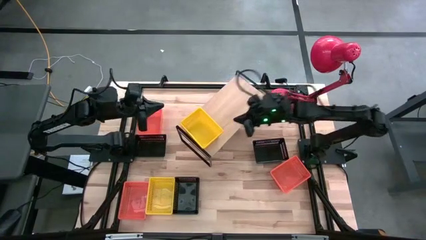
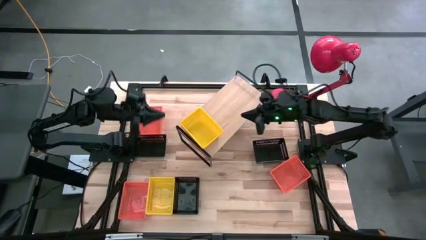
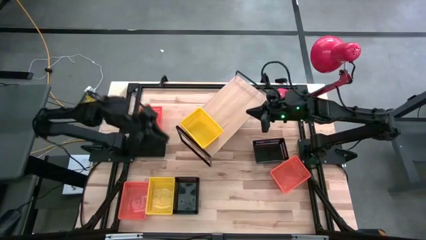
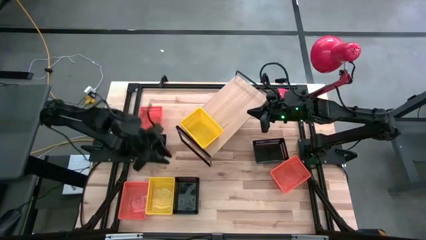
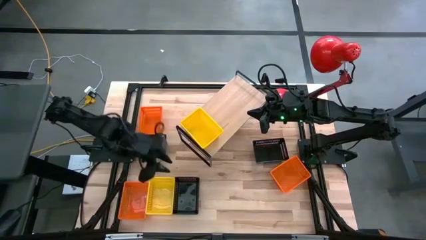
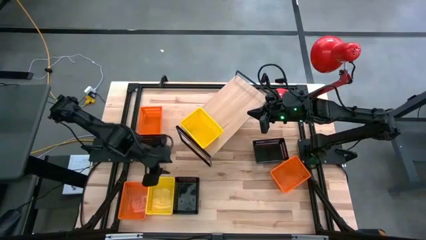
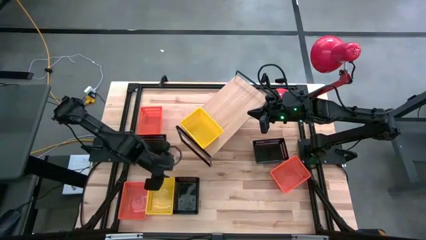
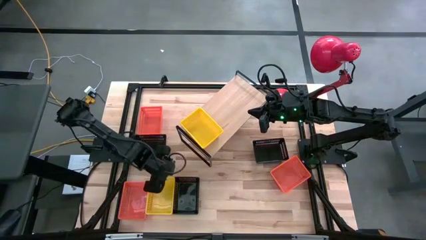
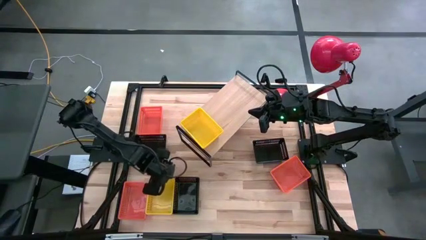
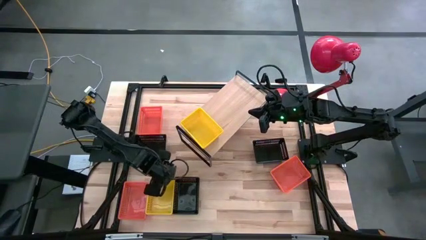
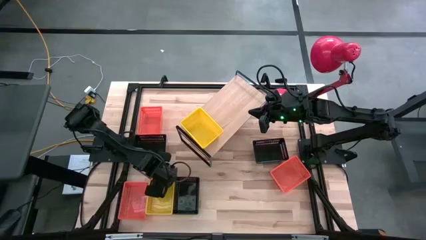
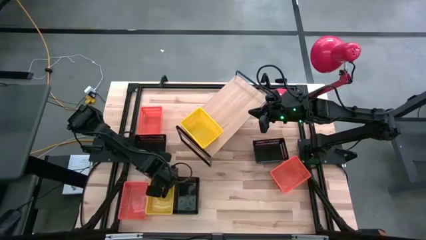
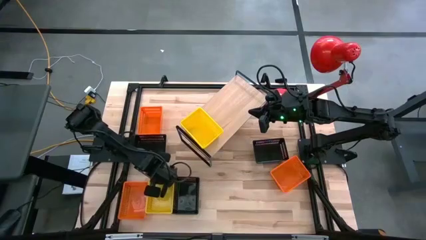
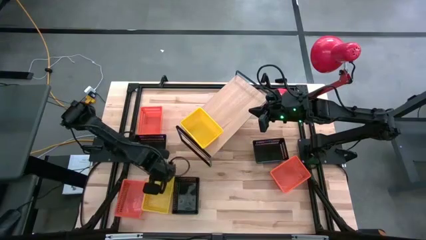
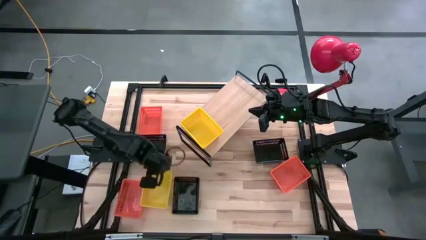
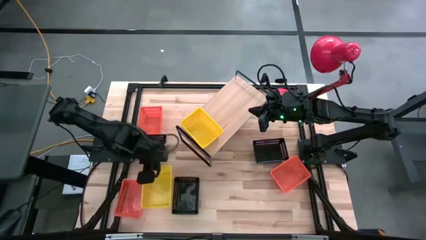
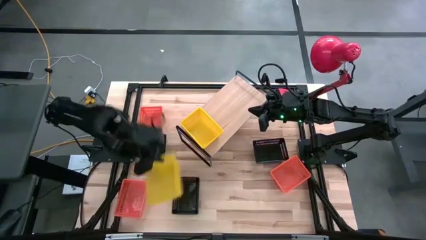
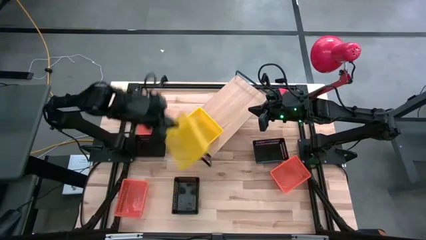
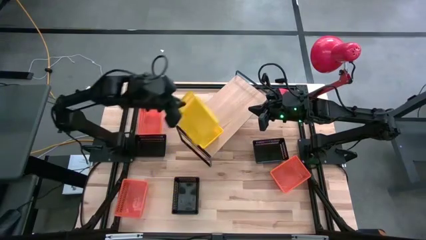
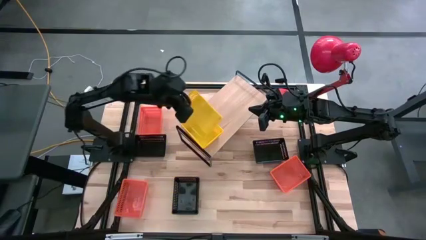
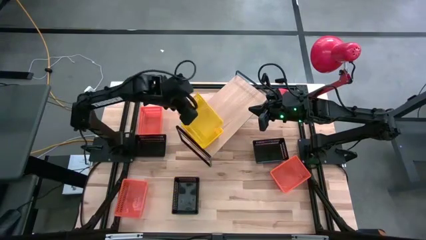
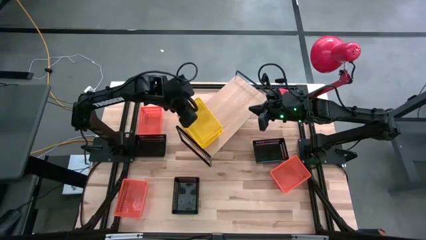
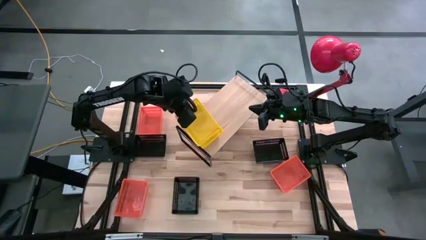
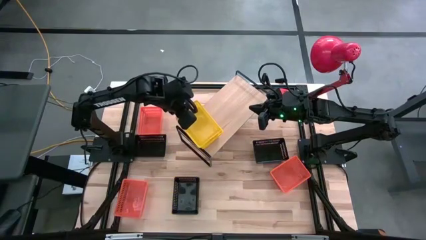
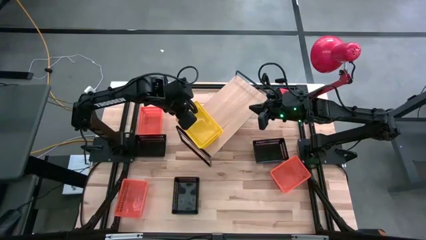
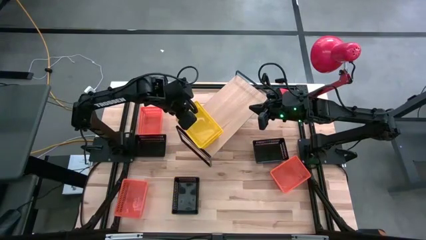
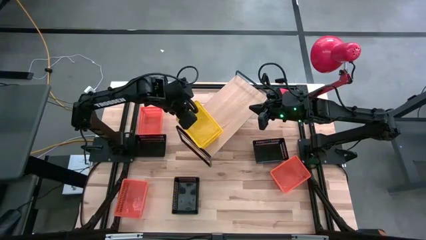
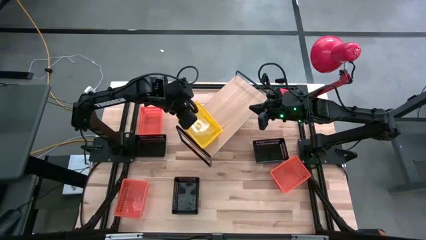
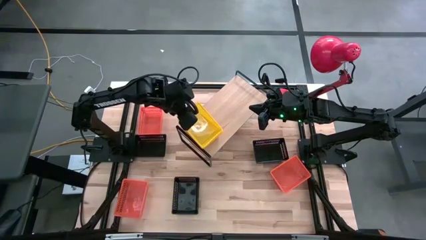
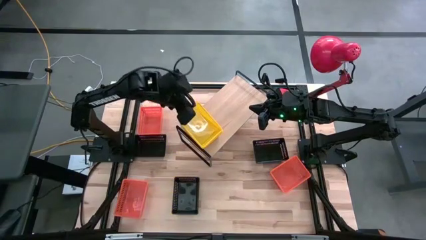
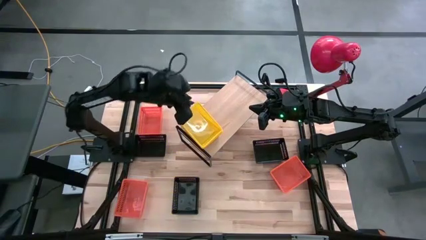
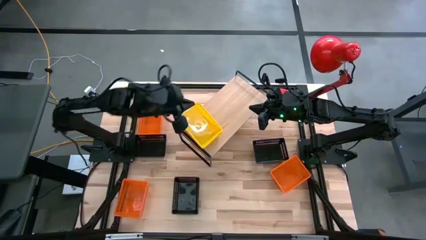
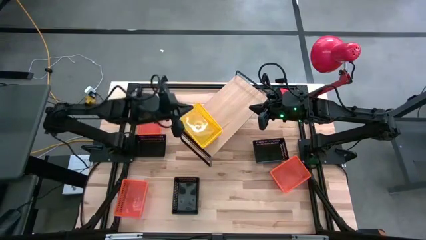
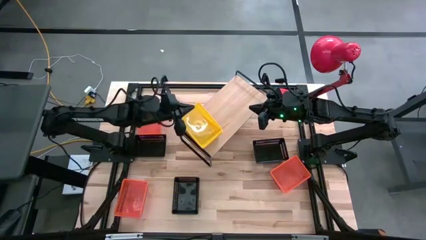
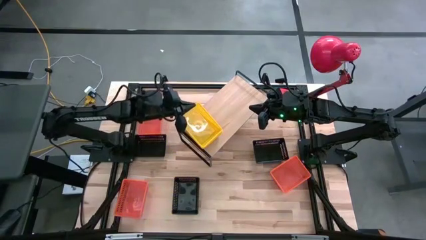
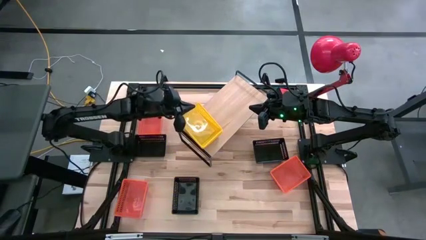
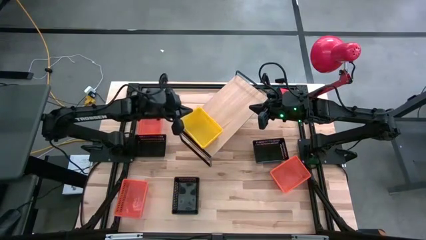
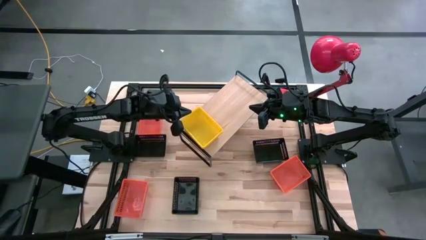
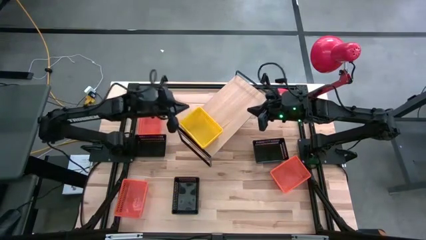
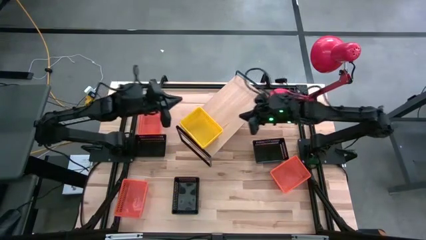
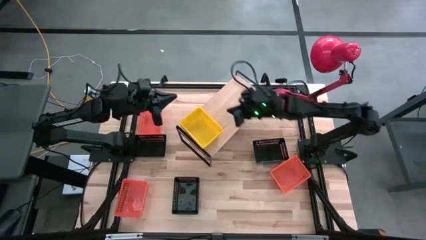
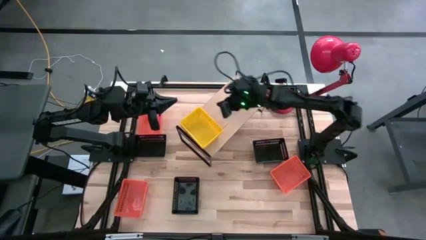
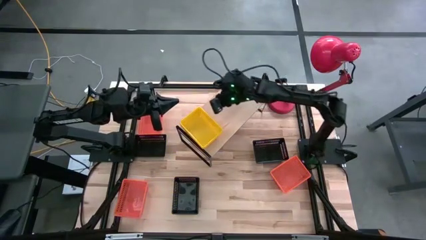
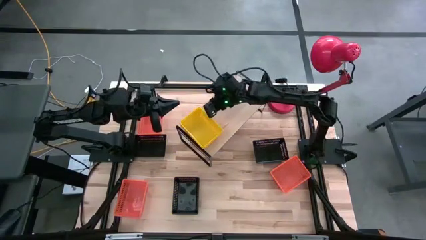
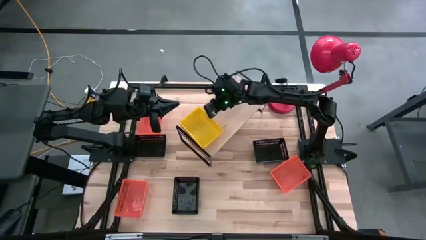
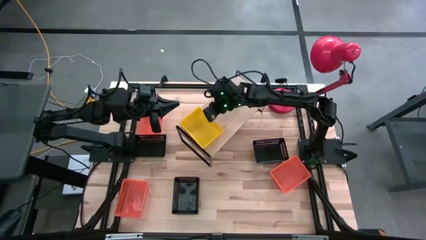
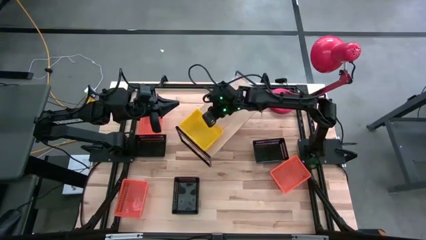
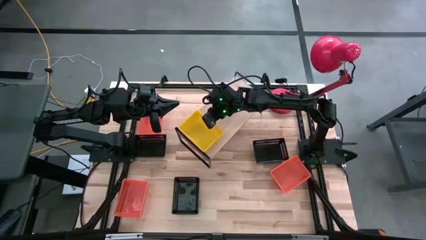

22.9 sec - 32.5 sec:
Task: Stack baskets on shelf by color
Stack the yellow bin on top of the yellow bin on the shelf

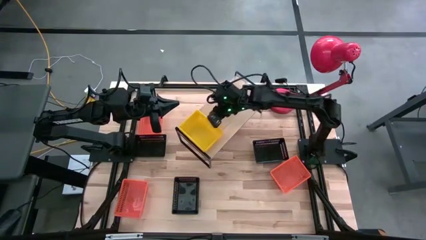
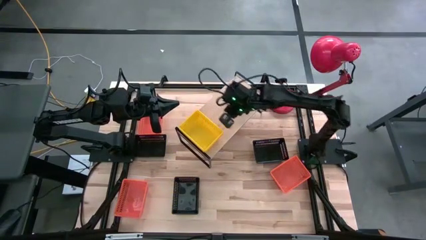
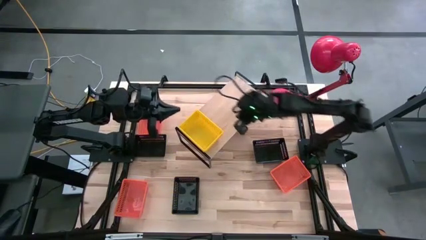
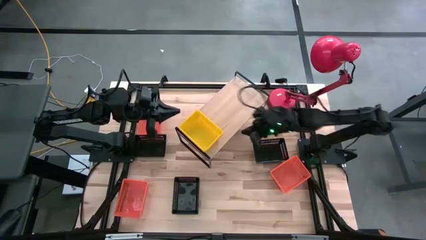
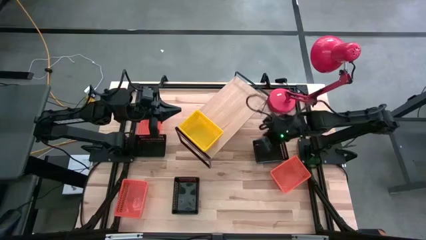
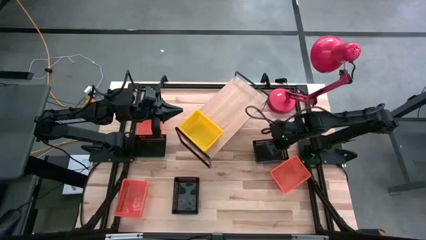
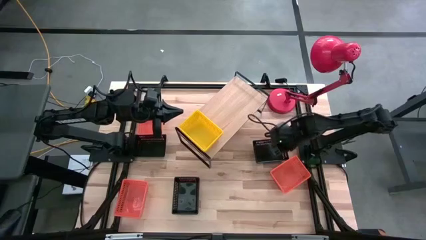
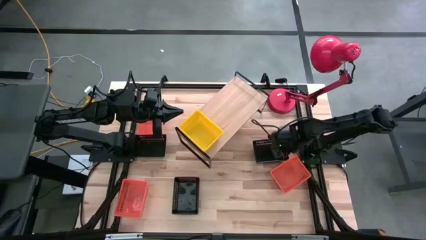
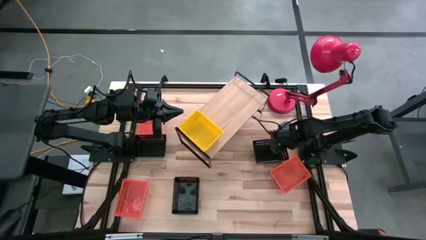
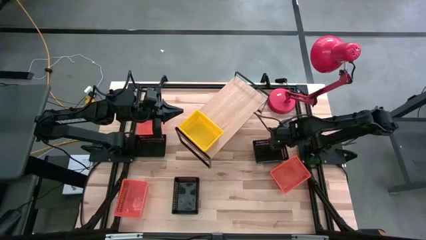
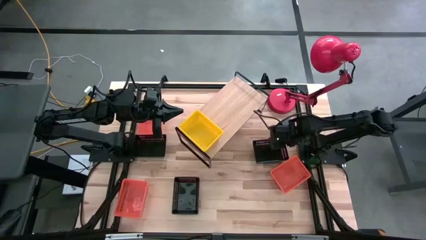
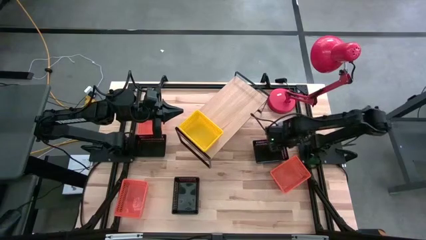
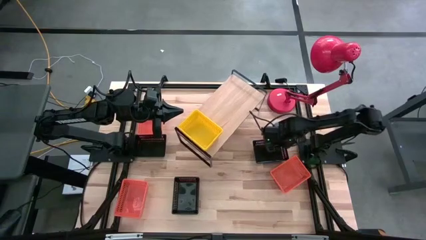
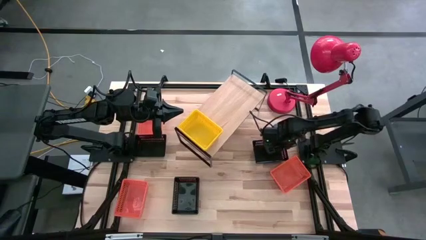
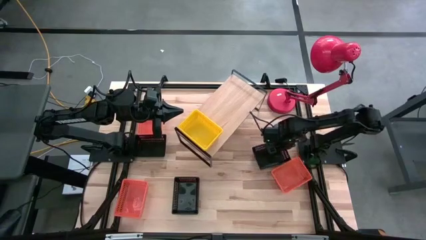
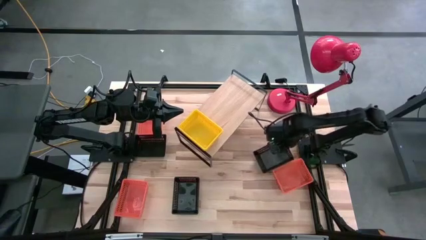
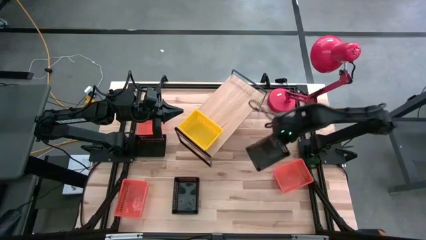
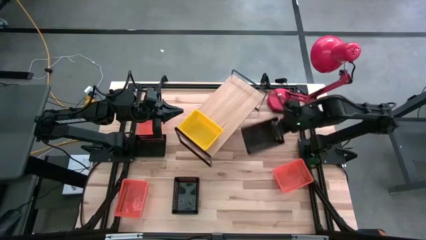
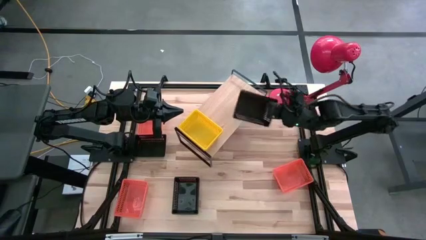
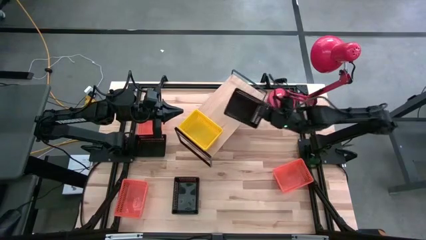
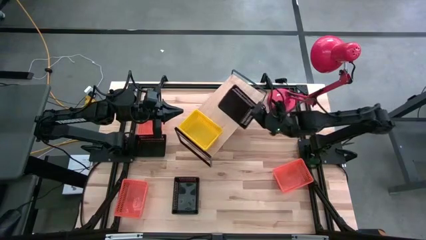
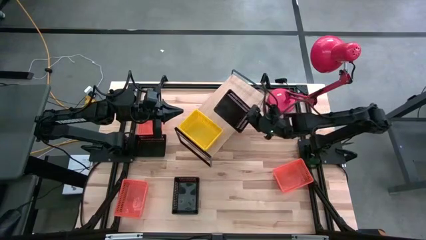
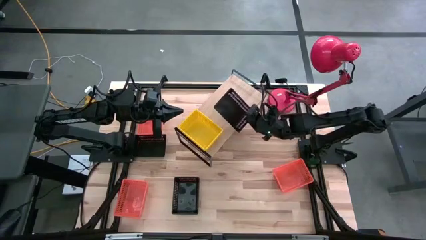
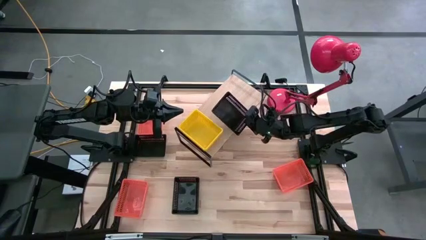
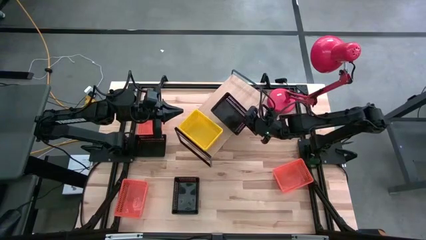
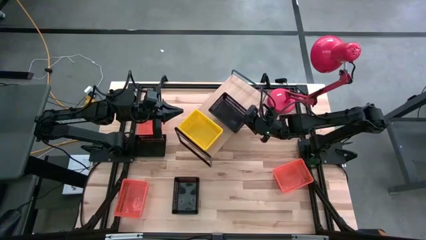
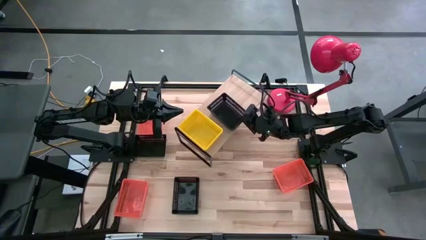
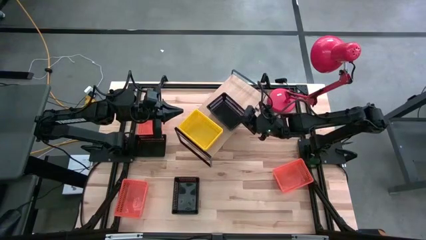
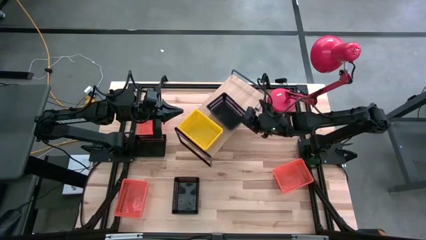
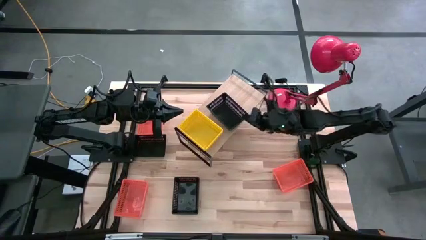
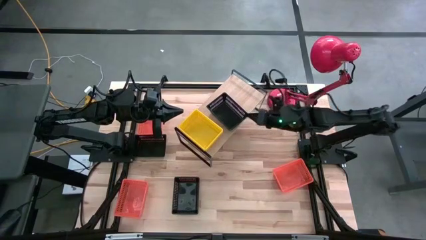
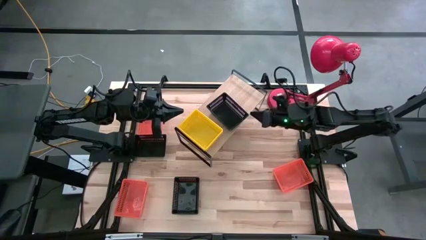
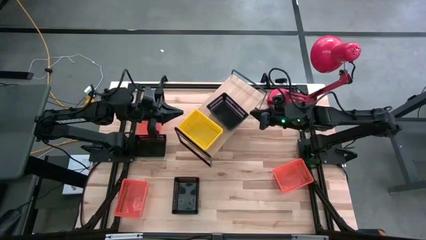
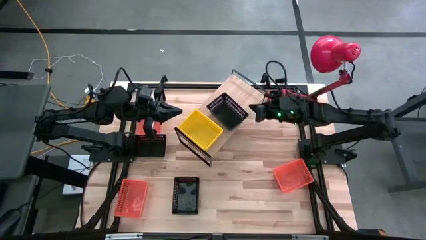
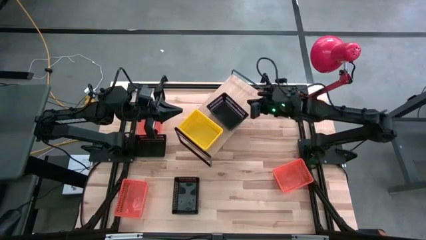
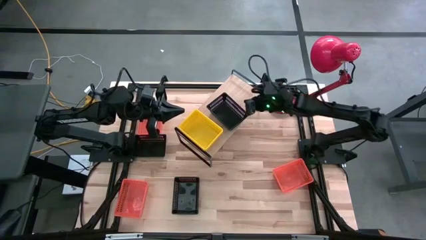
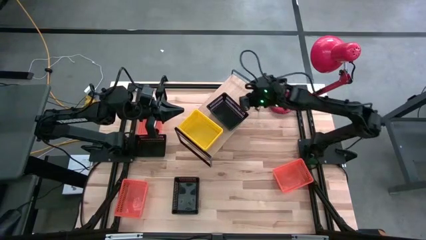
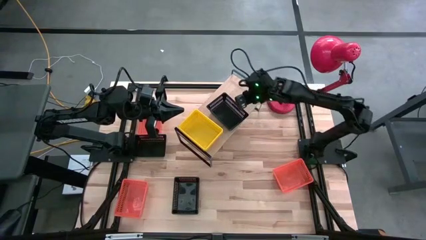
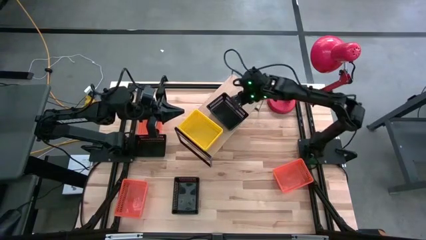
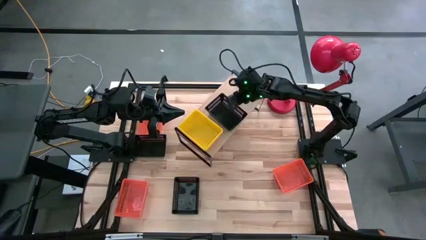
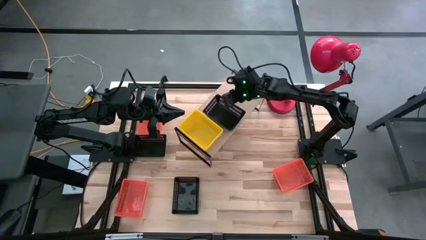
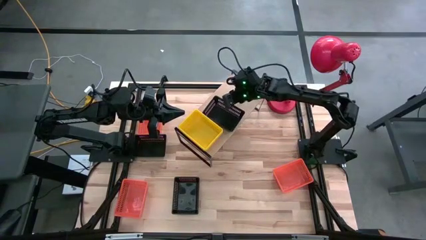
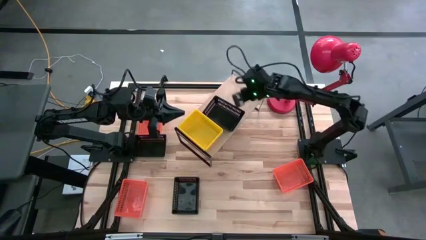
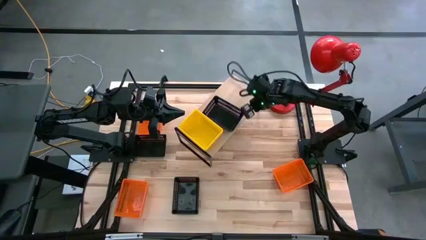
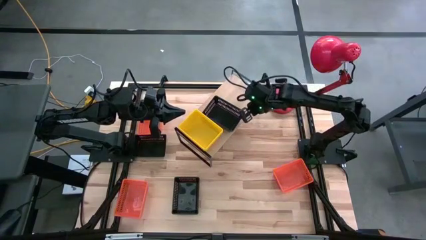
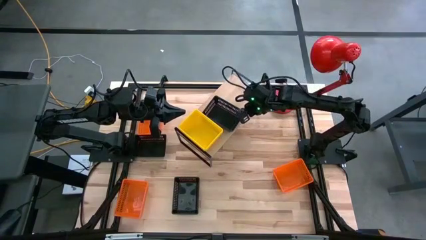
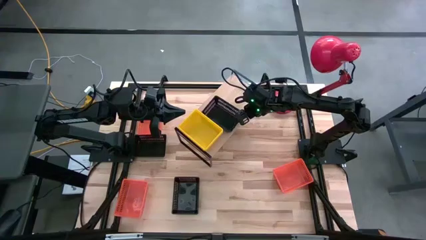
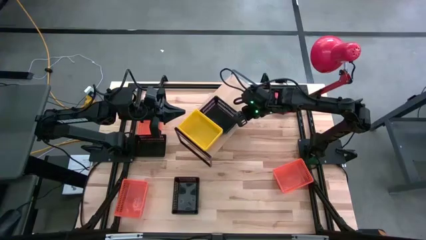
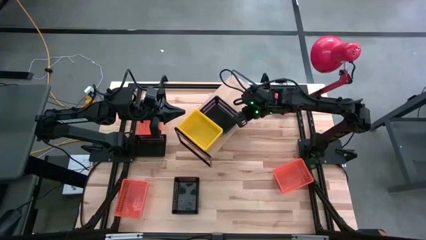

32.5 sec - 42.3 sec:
Put the top right black bin on the shelf
